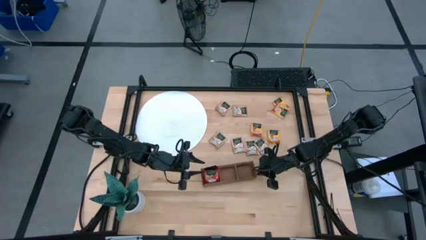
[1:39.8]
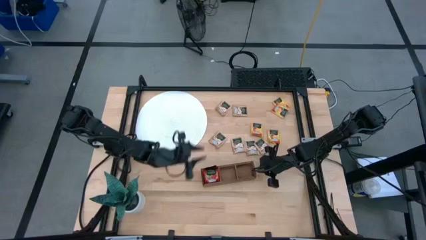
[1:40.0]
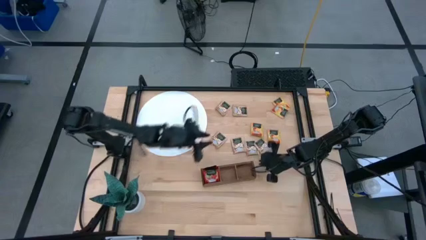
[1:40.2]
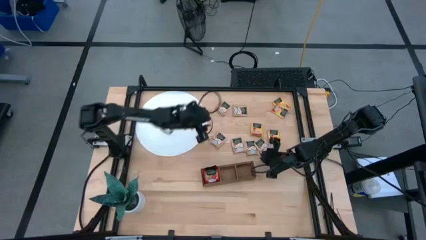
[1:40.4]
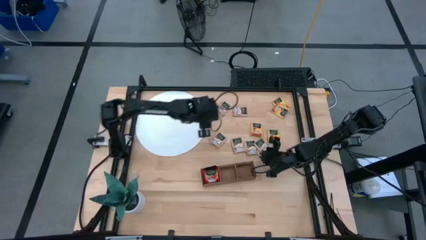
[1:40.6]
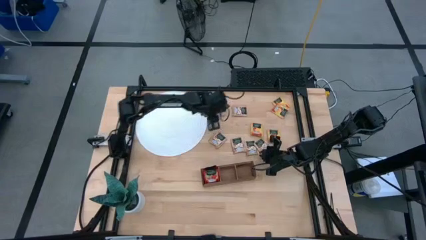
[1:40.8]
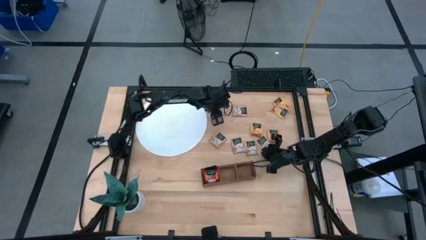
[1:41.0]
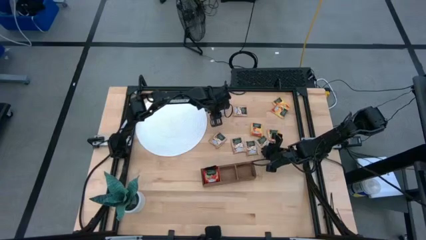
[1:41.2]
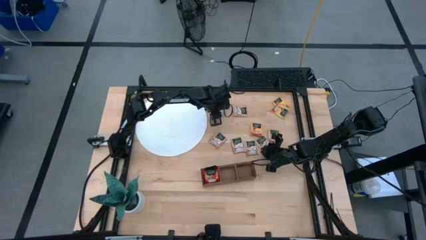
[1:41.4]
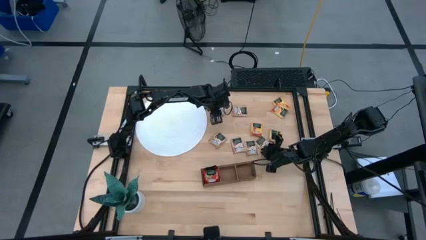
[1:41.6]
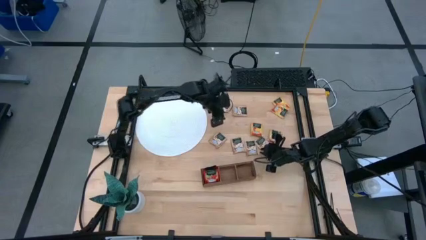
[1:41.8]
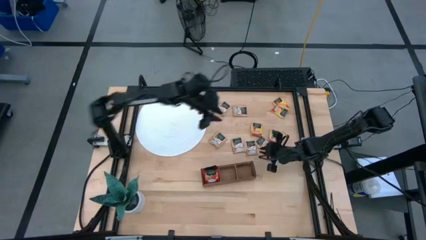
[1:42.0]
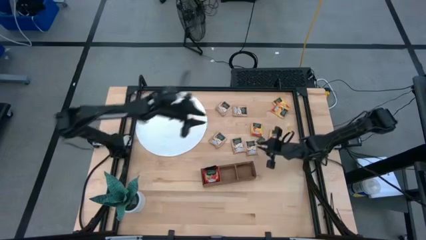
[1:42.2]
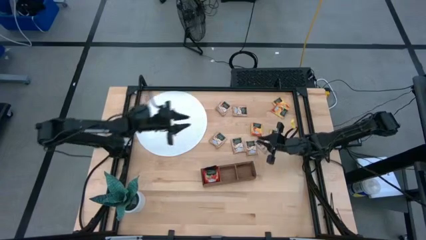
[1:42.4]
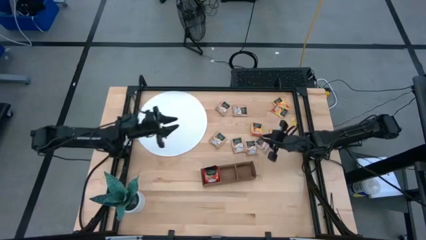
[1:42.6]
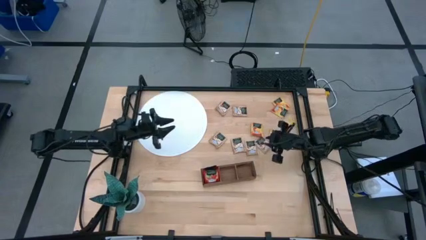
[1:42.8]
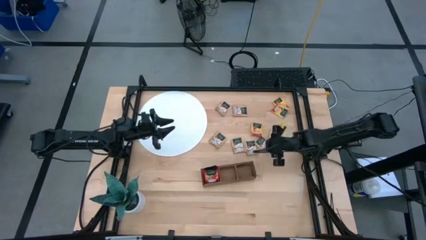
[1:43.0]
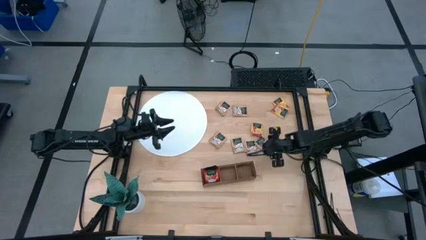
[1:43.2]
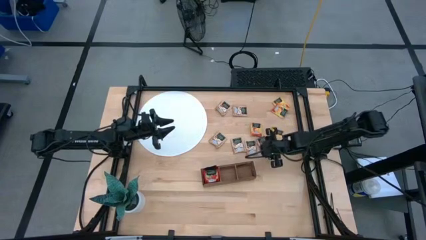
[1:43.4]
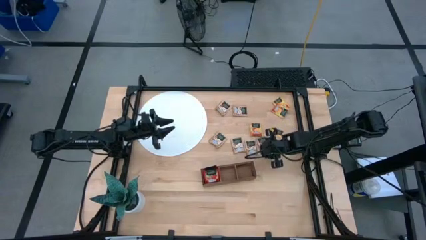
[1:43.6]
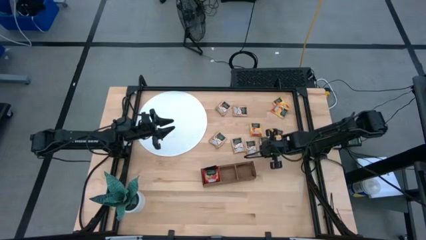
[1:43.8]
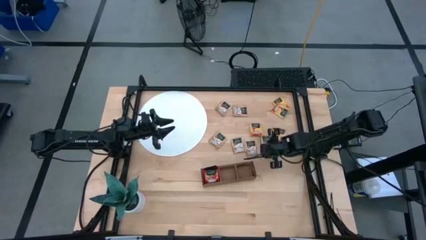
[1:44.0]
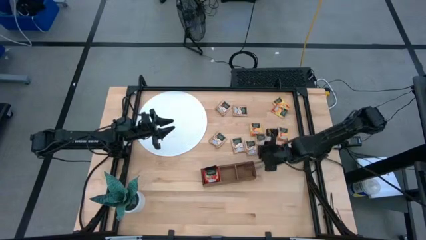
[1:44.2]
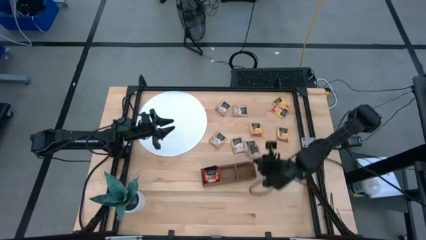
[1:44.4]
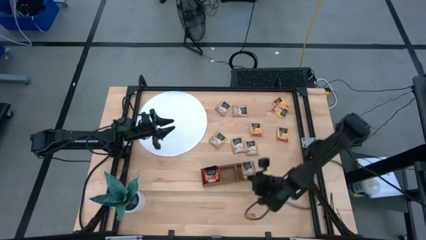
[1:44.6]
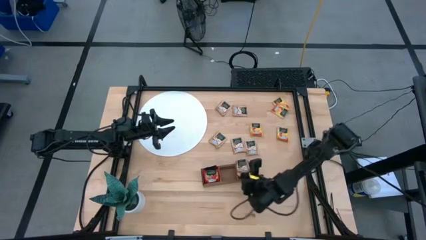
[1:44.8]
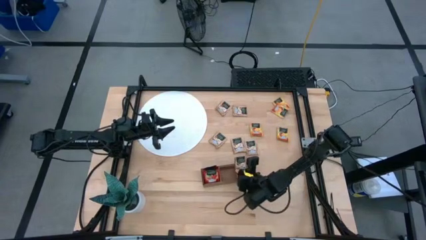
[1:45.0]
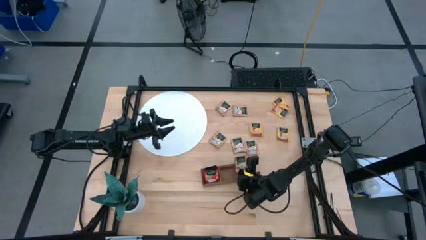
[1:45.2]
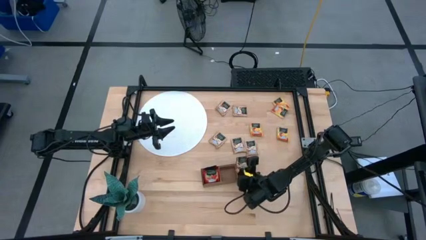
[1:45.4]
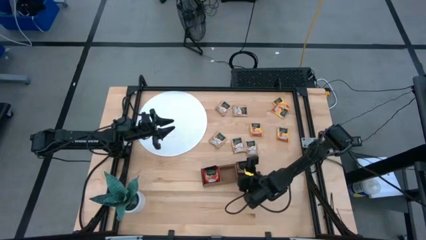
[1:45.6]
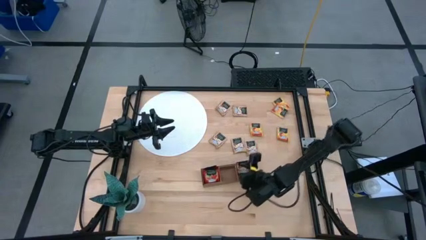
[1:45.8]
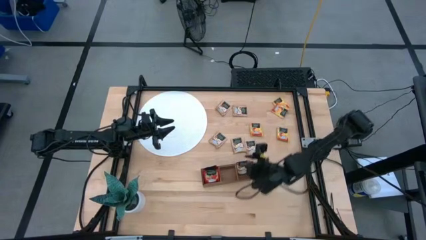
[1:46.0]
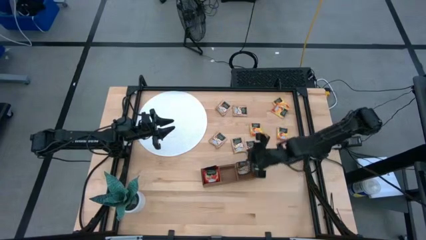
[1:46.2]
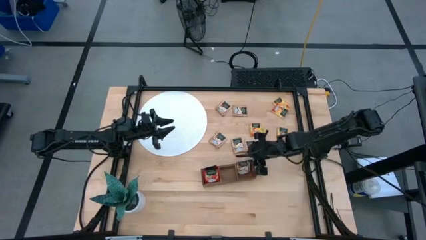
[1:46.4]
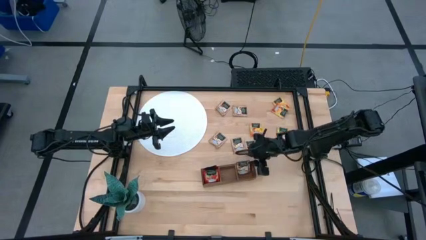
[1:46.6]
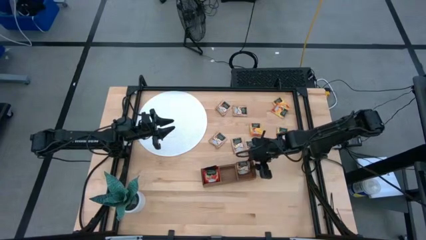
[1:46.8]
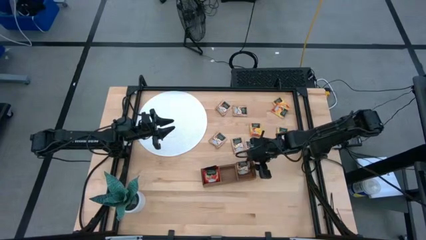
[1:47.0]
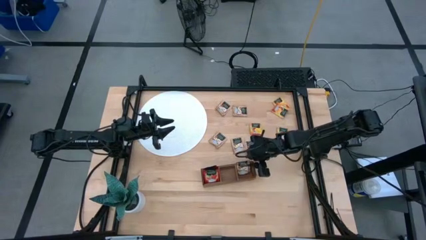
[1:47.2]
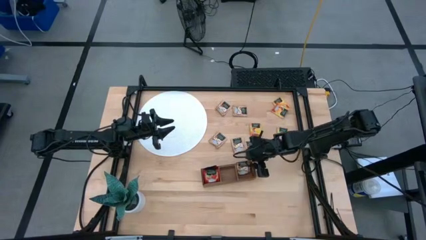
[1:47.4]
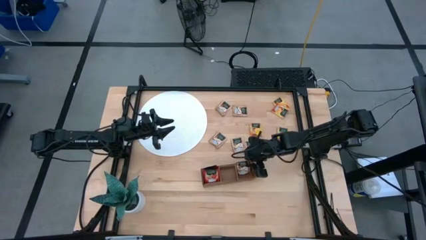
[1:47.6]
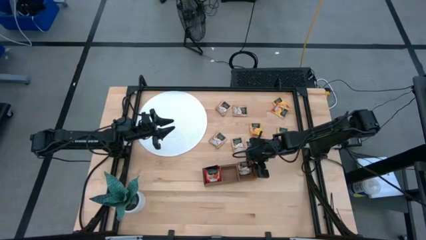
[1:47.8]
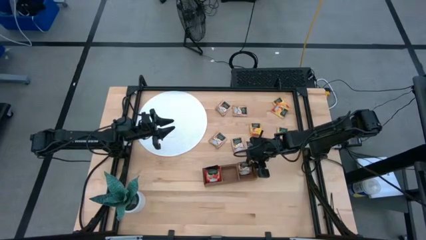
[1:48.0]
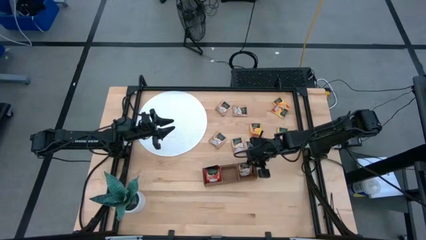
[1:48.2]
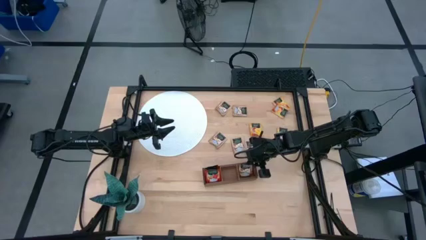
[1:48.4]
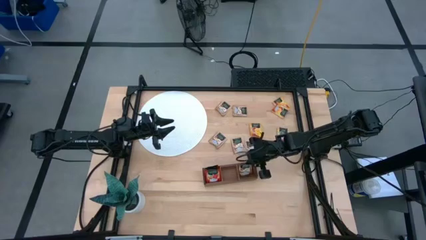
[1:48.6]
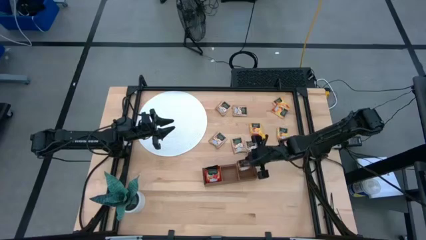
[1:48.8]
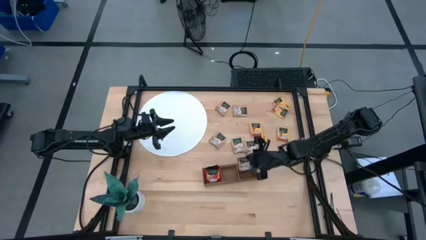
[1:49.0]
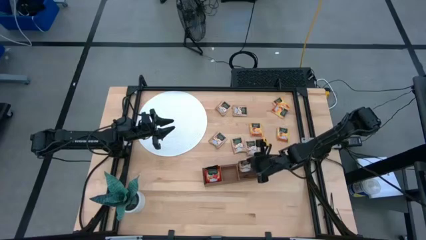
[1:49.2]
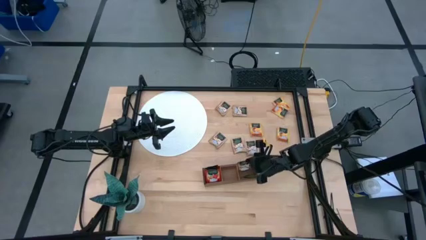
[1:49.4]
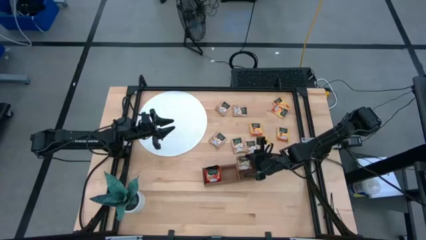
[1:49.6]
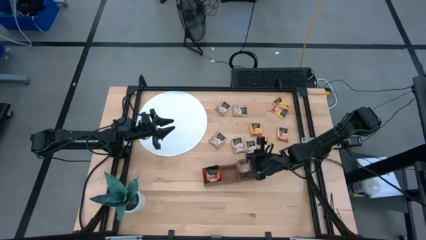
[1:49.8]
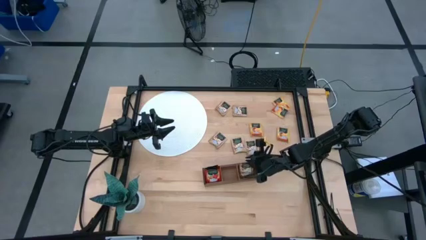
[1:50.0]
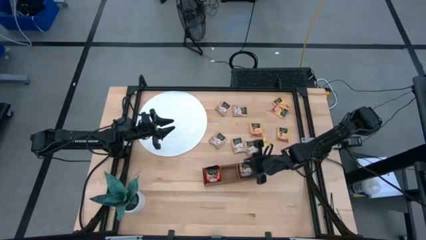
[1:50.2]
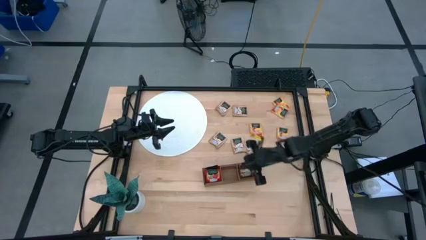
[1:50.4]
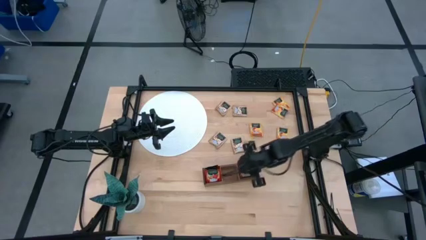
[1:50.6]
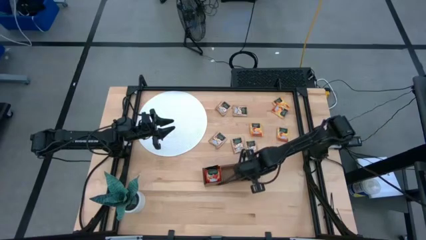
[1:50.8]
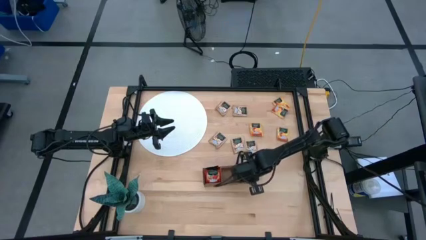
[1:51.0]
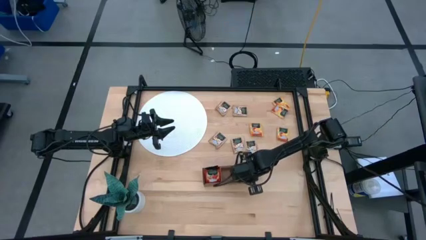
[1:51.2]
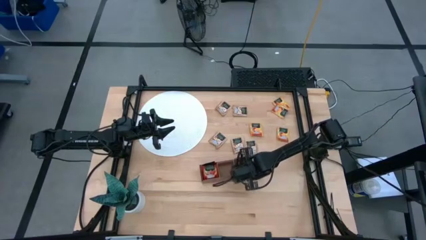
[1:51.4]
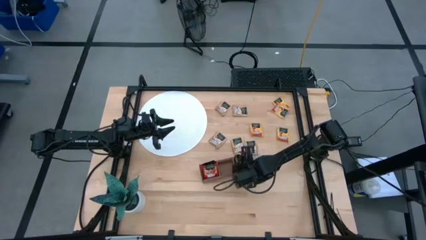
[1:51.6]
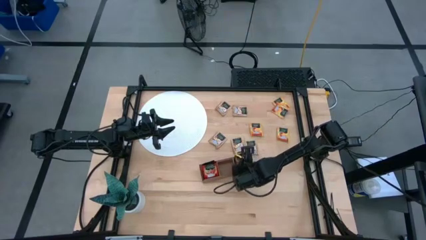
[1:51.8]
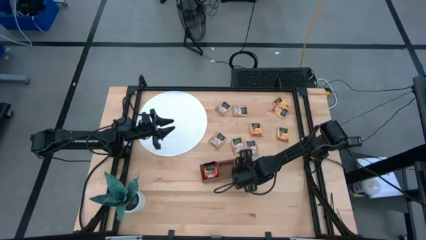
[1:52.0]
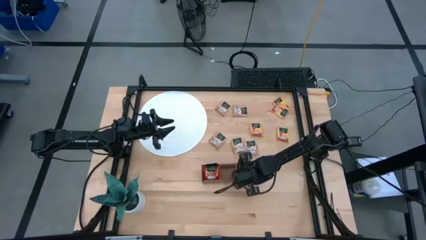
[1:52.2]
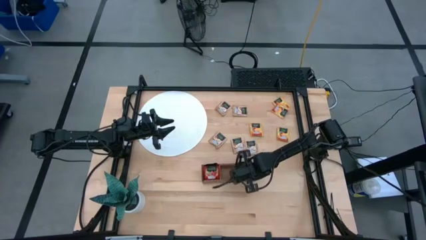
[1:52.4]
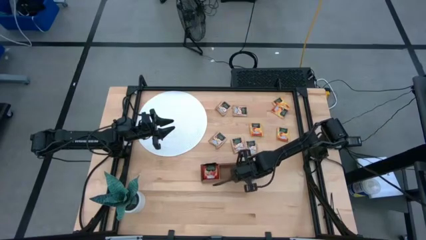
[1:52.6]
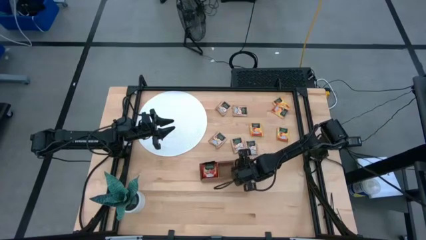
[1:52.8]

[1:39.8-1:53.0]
Task: Pick & Place Tea
Put the brown tea bag into the right section of the wooden organizer

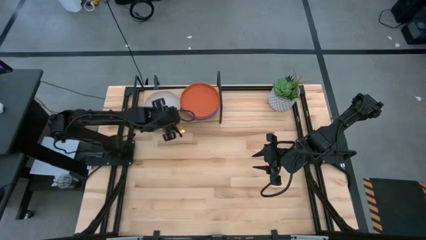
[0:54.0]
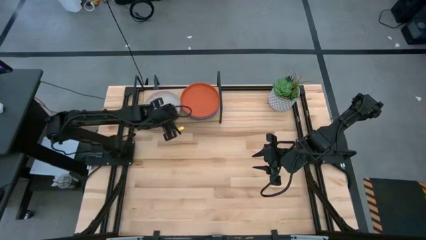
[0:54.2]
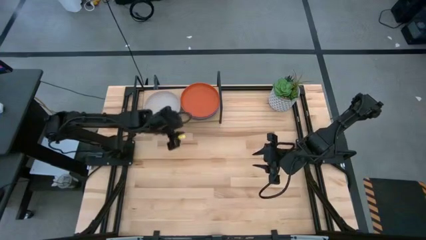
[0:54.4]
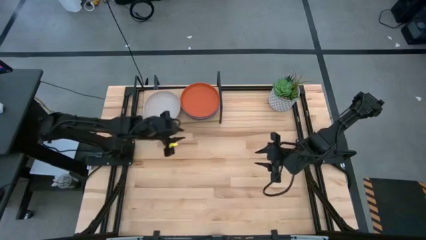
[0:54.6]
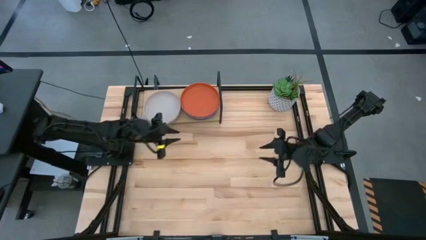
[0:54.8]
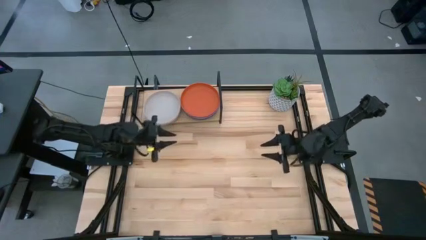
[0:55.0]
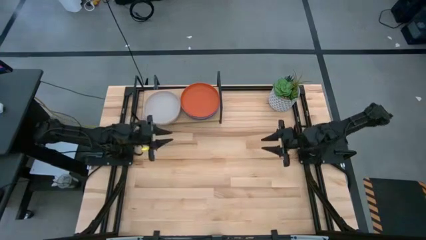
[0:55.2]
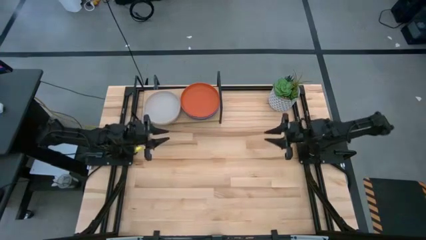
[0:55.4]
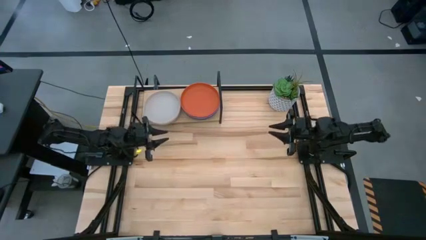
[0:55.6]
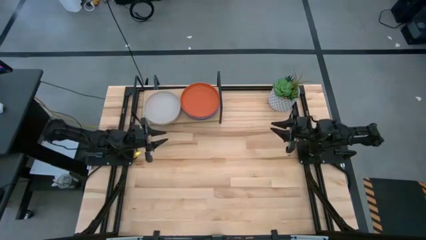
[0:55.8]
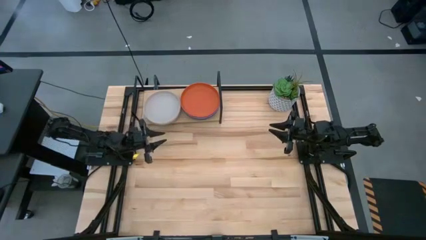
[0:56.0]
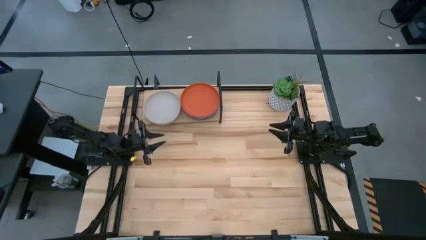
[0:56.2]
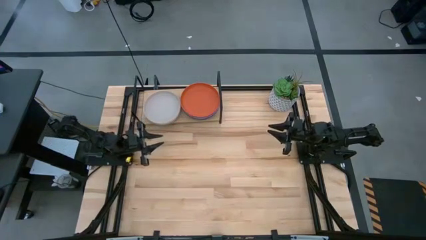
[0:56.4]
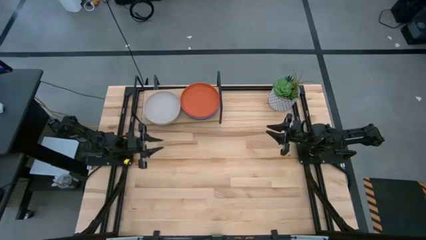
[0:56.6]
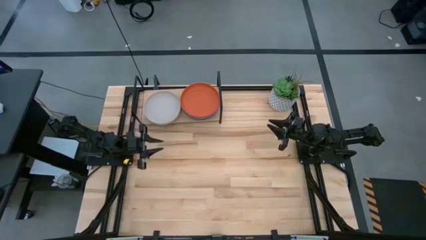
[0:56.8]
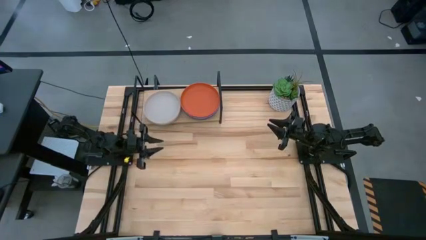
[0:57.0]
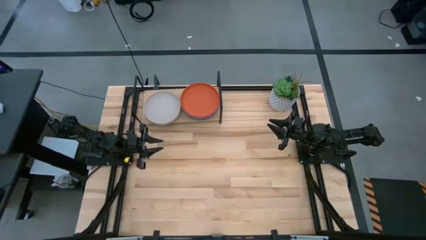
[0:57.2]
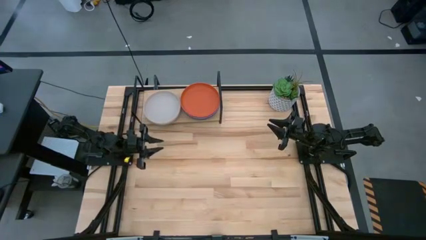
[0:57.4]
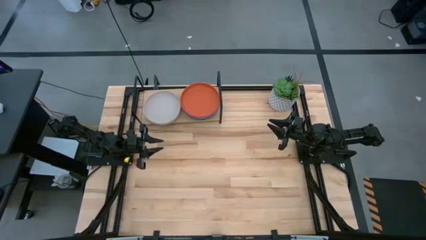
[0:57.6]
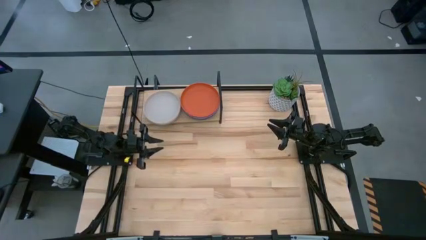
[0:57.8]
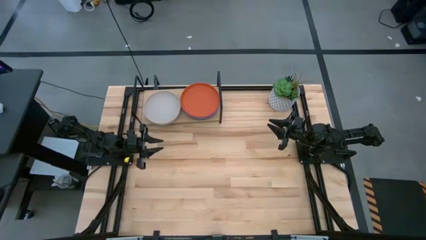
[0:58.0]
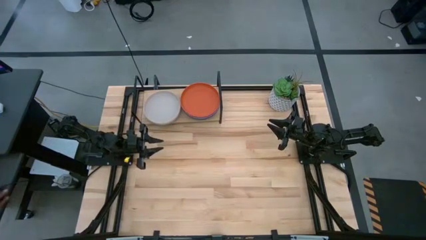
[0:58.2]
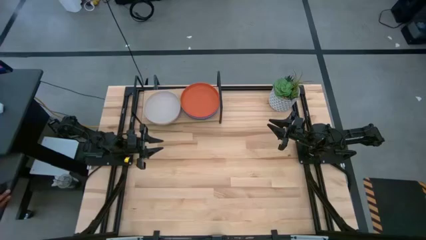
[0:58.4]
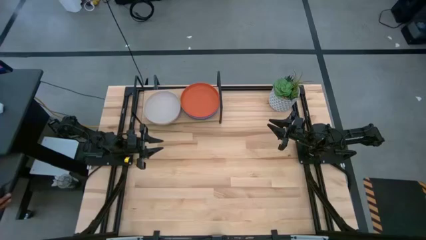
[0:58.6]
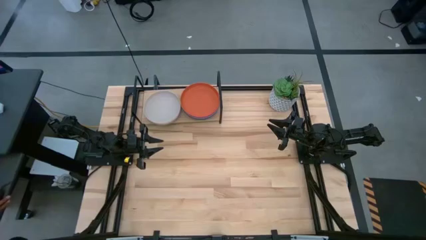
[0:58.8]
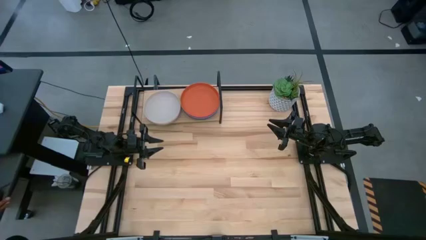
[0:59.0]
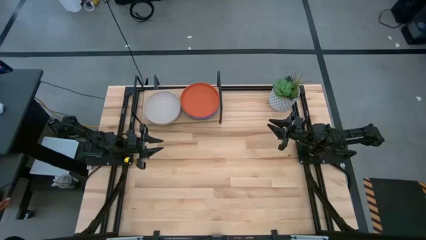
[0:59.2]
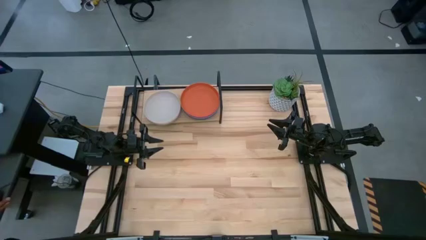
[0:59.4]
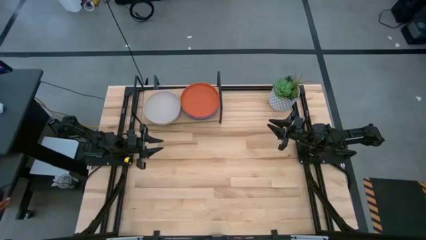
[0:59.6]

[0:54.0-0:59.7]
Task: Place and stack plates onto a shelf
Return to Home Position
